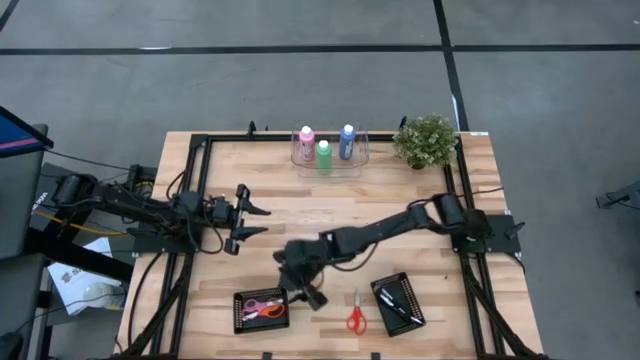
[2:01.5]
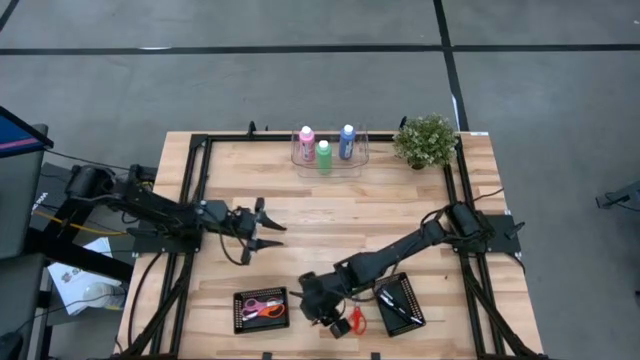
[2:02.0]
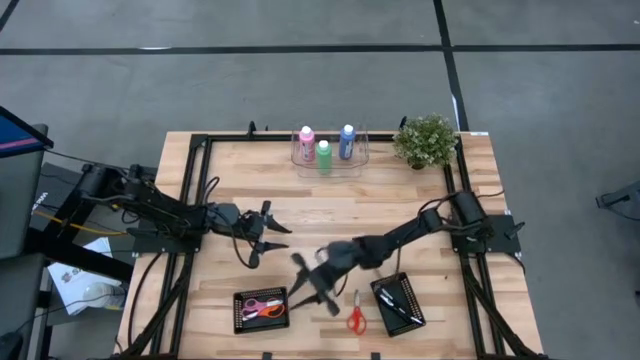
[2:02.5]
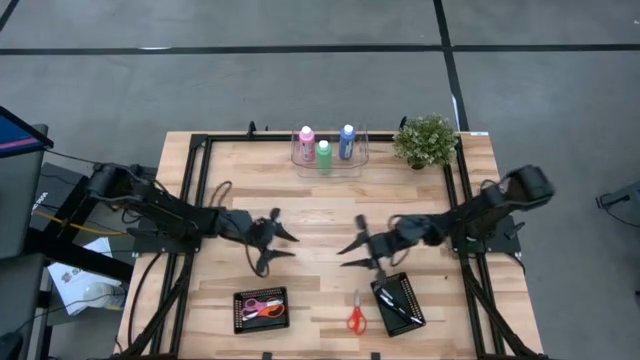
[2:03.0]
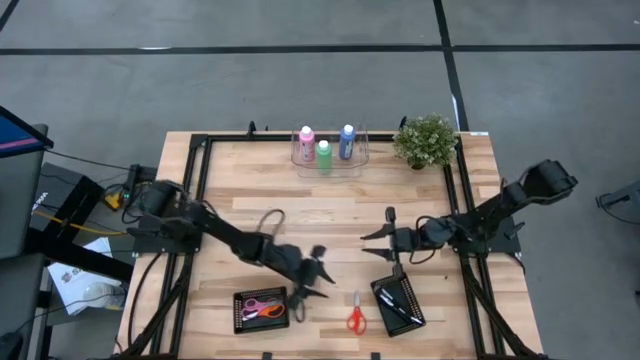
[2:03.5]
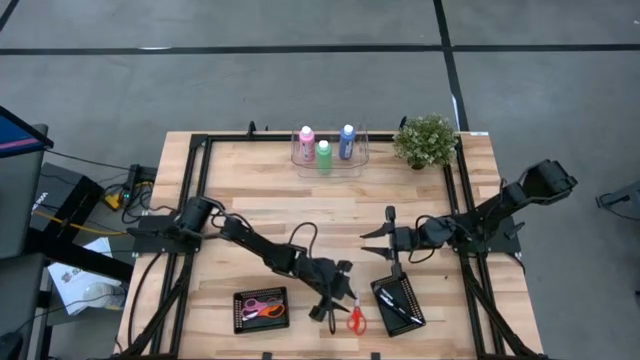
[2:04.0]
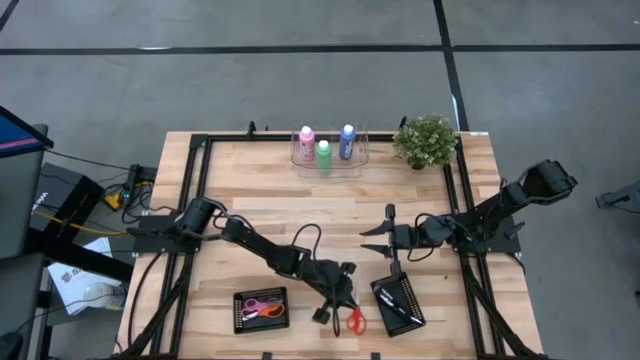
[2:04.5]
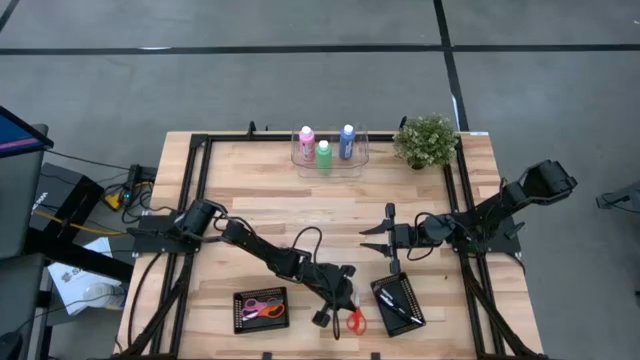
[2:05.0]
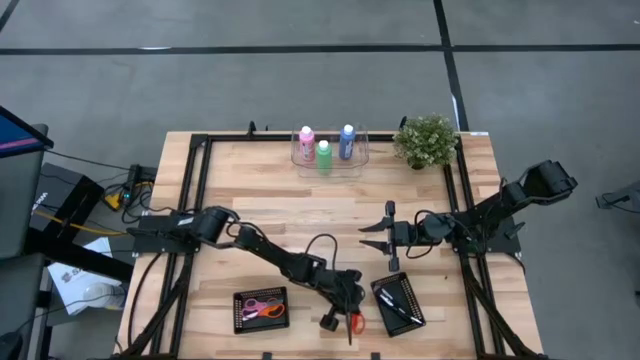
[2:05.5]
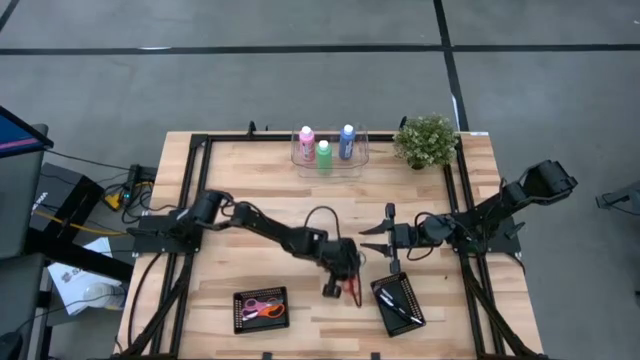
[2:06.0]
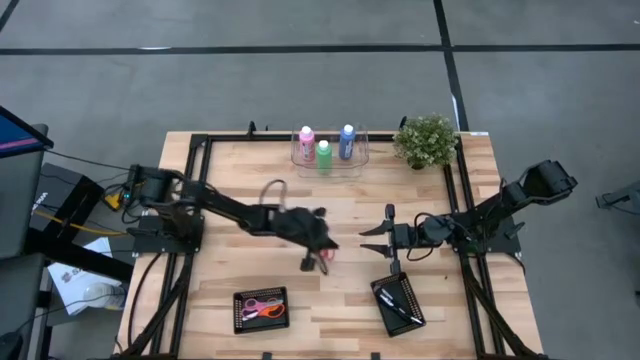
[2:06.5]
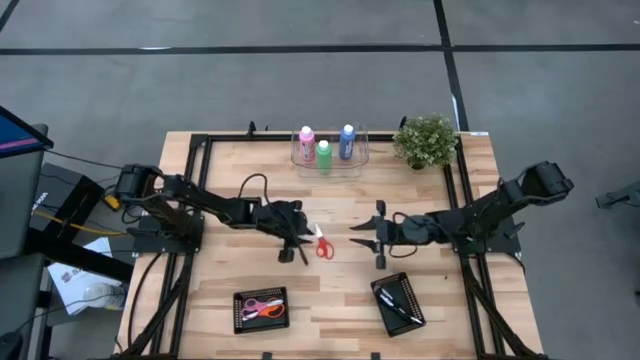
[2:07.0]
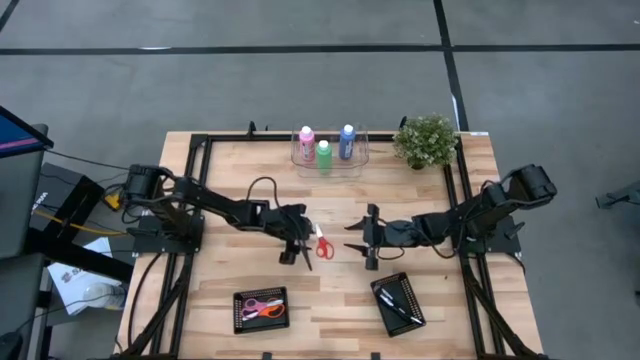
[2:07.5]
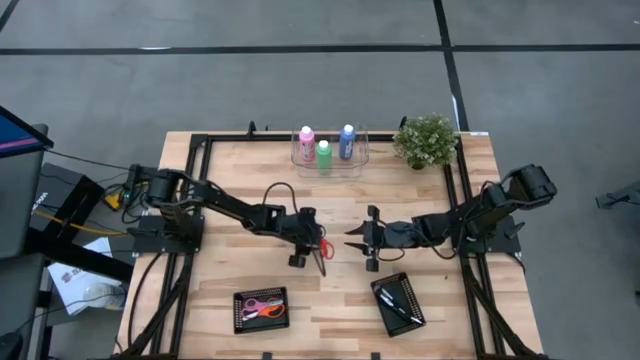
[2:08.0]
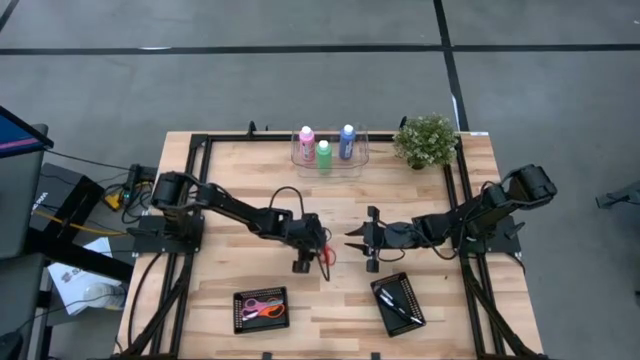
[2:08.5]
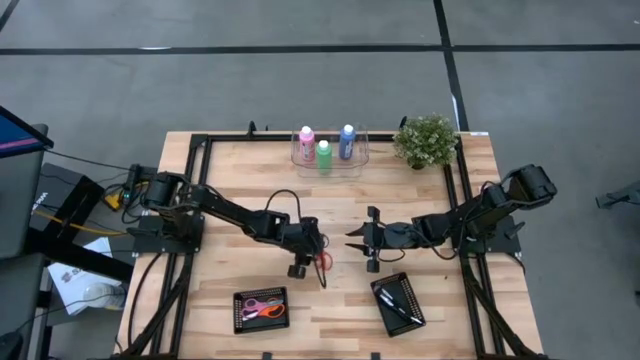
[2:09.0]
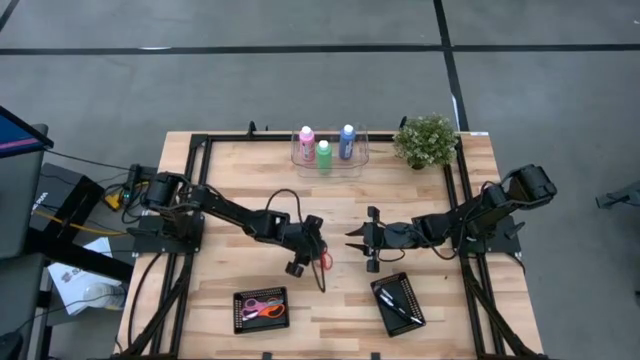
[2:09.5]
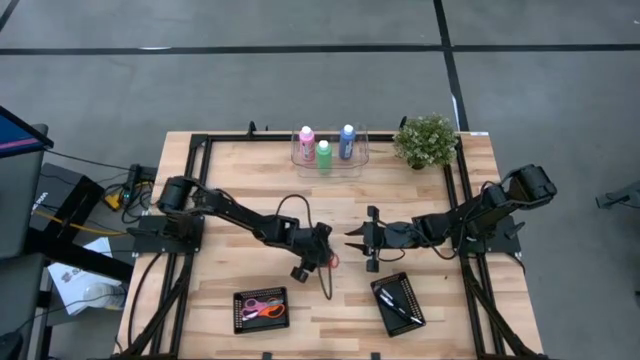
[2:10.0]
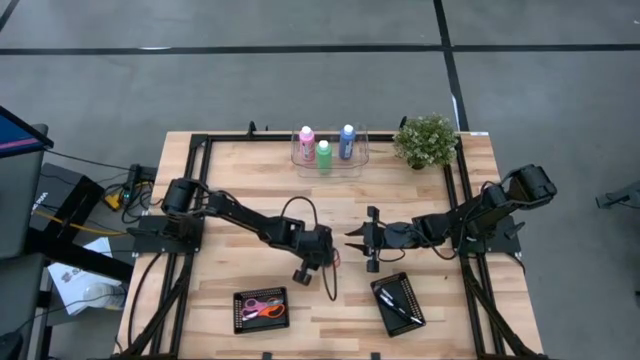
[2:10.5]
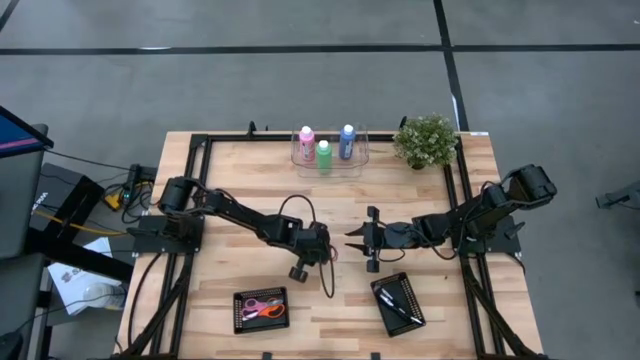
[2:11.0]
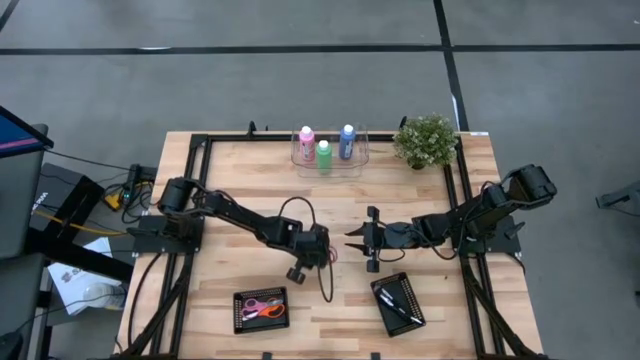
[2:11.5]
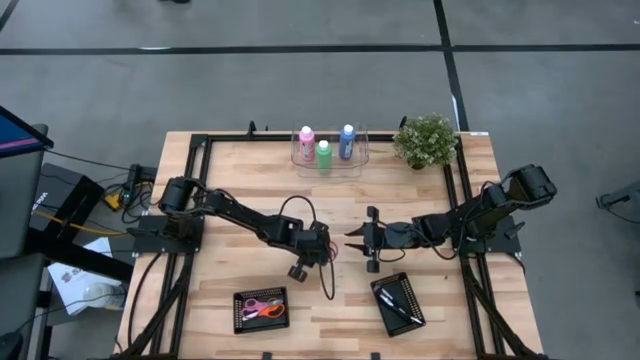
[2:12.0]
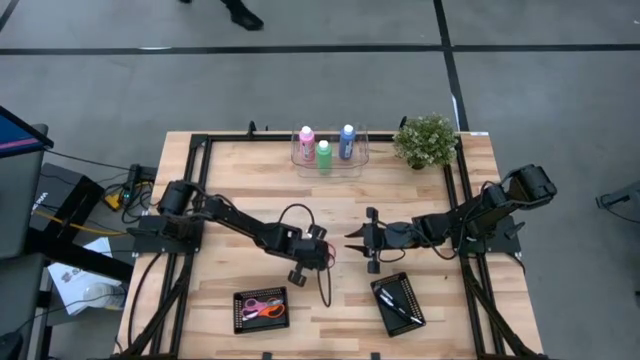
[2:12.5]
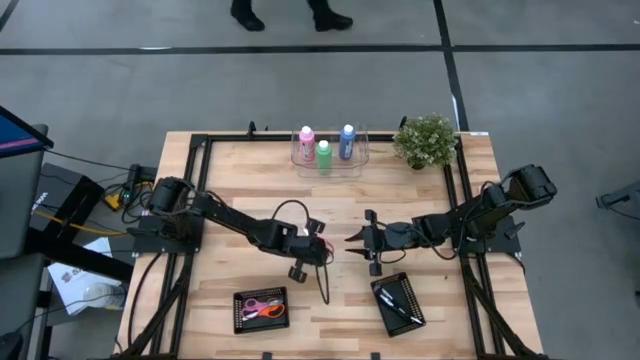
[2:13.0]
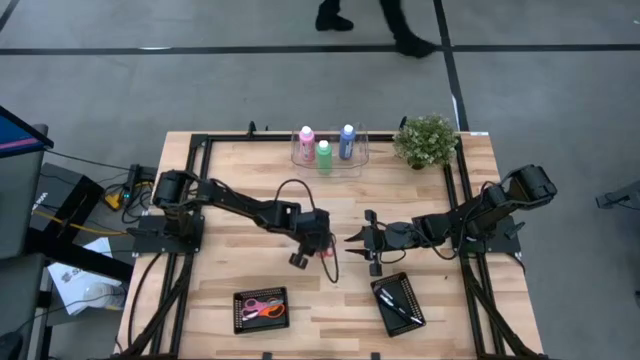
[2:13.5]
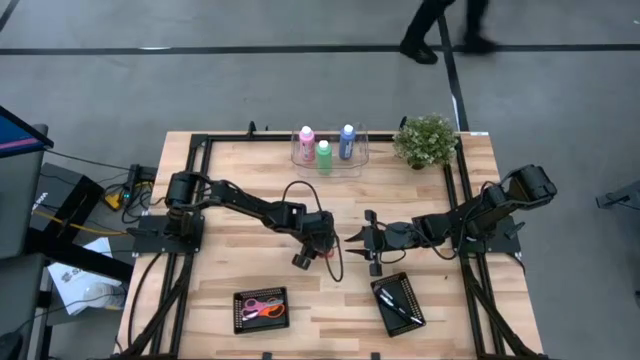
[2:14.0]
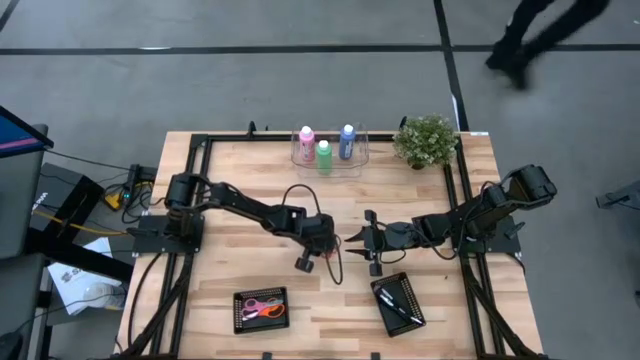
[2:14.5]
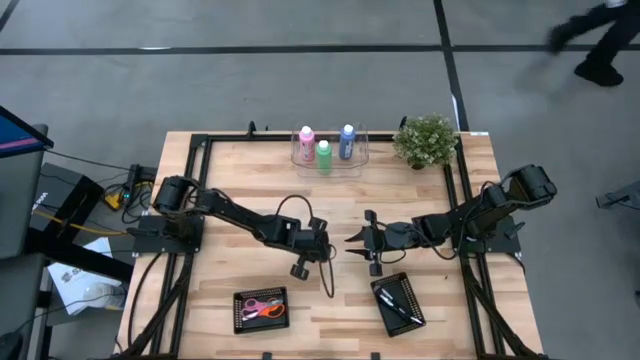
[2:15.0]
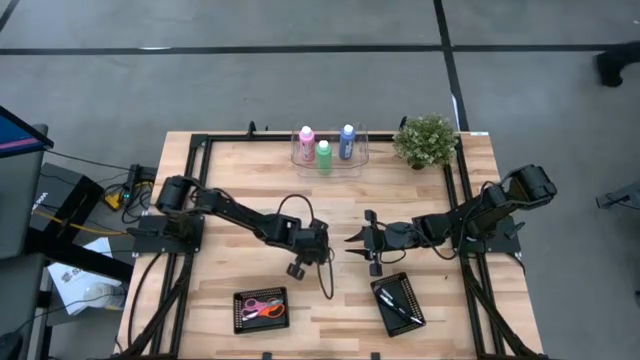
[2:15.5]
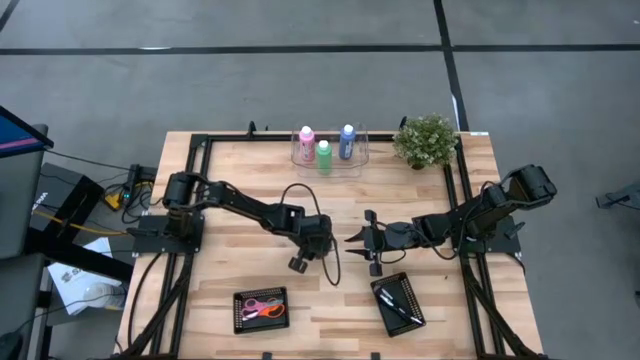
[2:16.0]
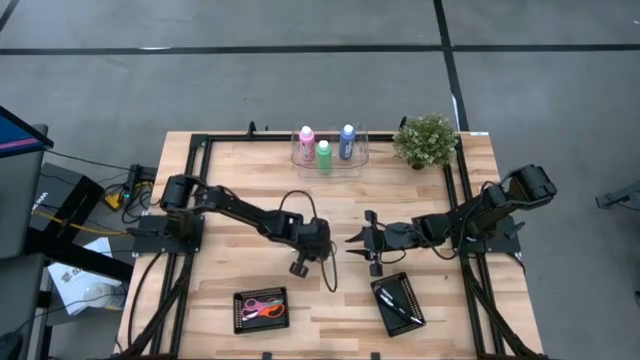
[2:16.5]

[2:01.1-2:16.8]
Task: Pick & Place Paint Supplies
Put the red scissors into the left black bin

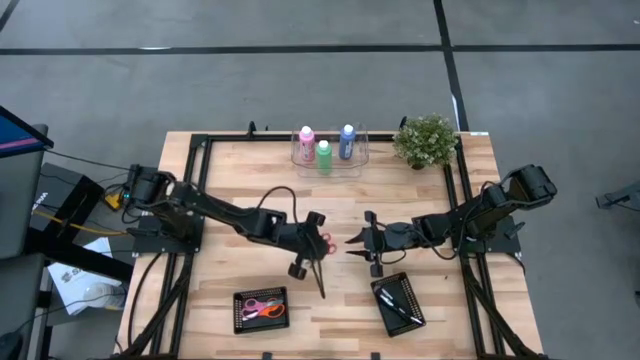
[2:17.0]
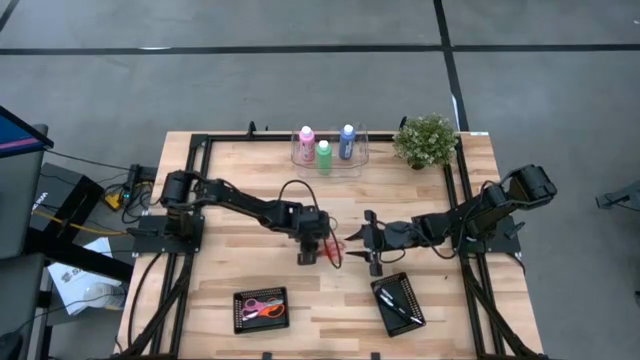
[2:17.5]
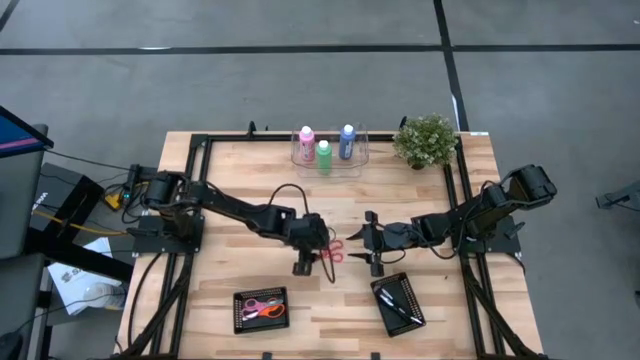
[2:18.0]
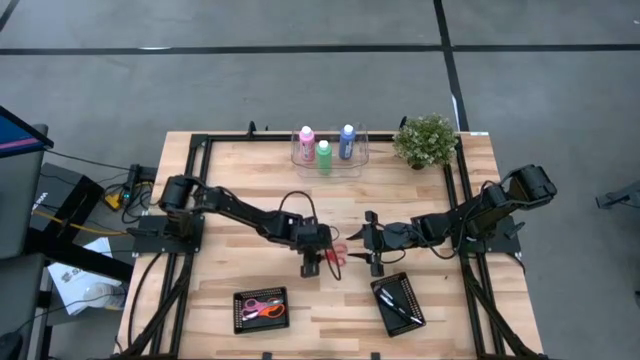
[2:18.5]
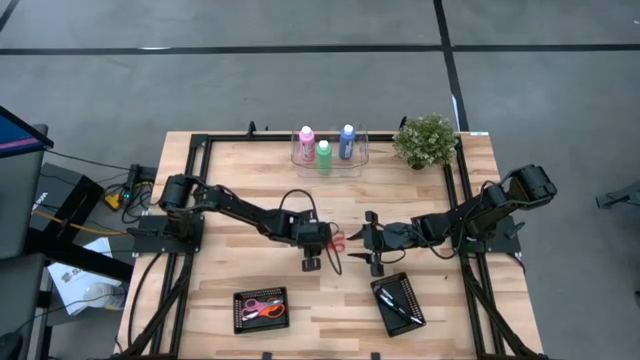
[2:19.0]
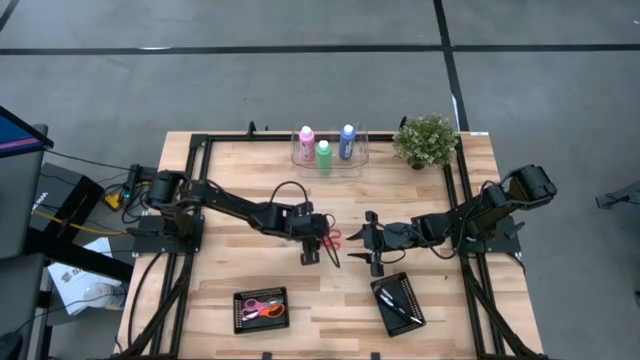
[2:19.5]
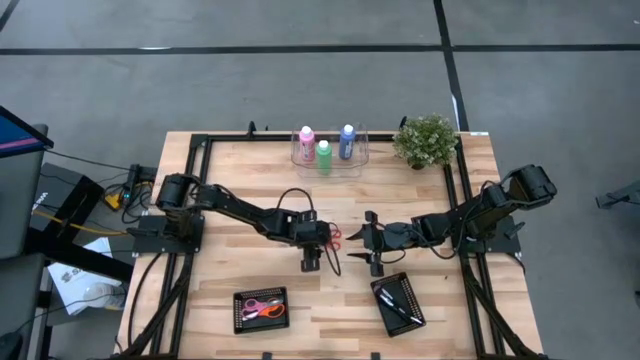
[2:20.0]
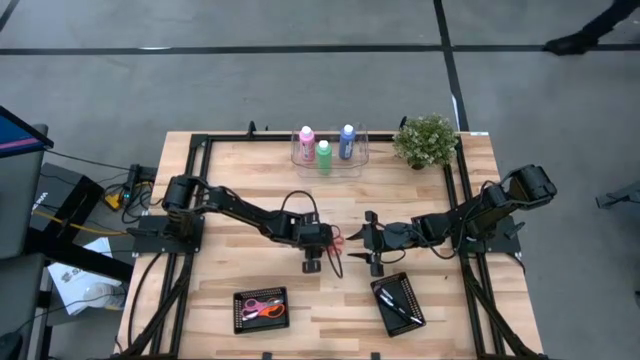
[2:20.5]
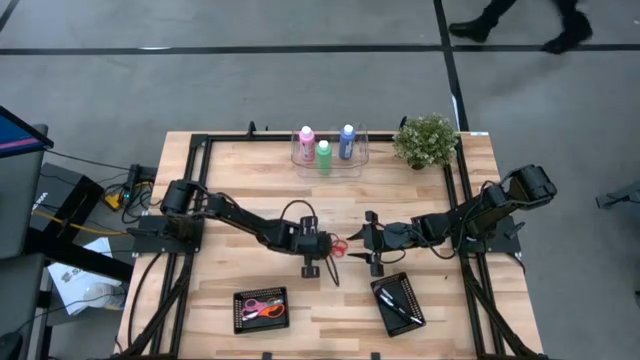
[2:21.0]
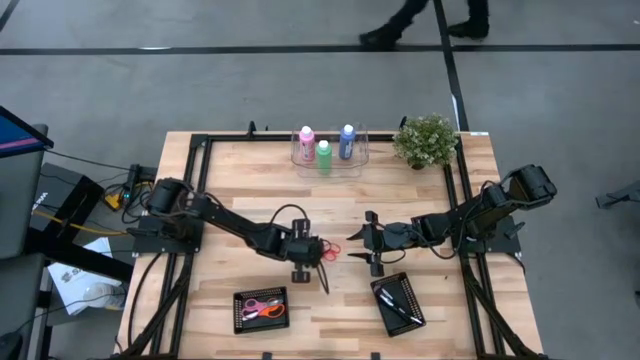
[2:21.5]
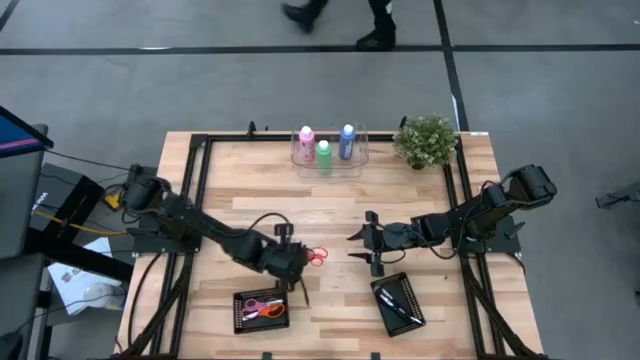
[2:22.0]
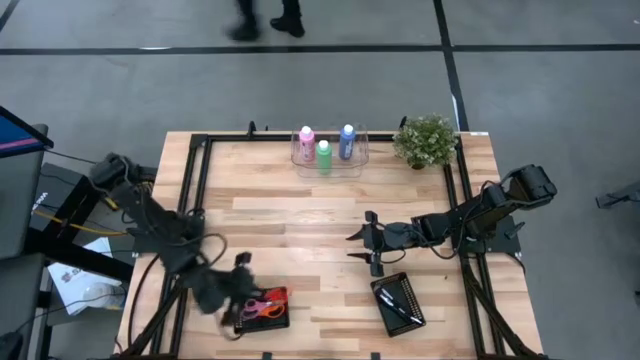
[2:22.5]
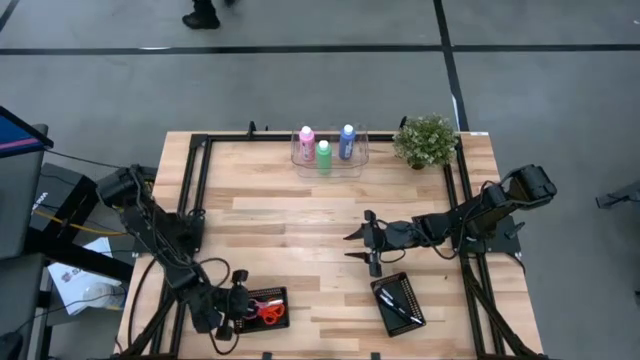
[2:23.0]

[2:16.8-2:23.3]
Put the red scissors into the left black bin
